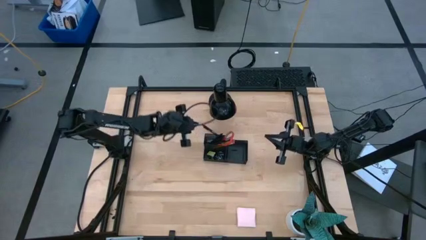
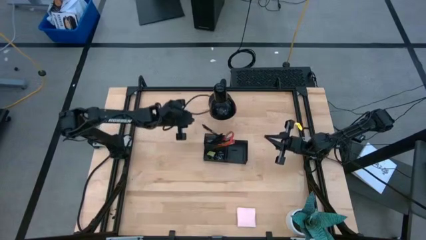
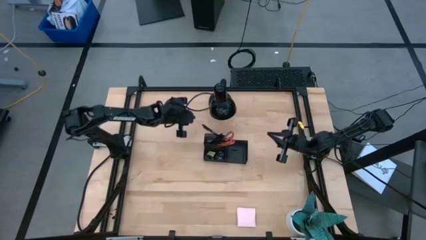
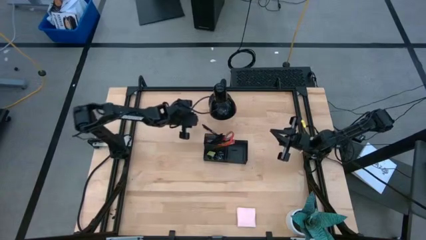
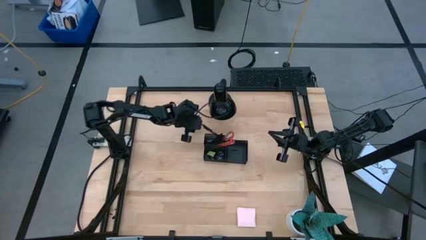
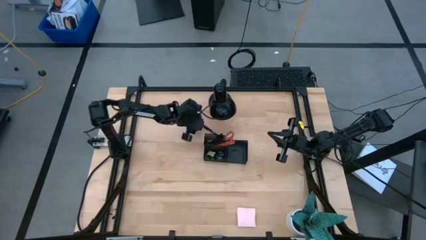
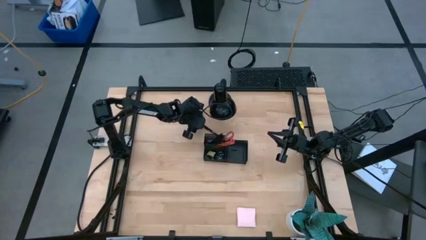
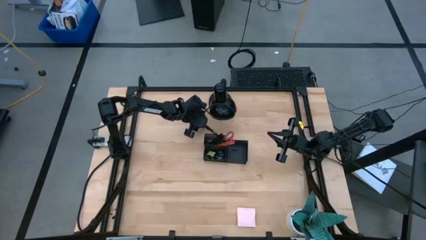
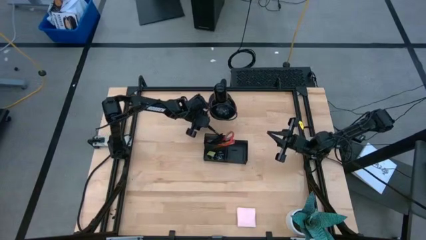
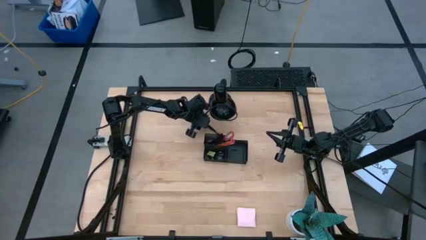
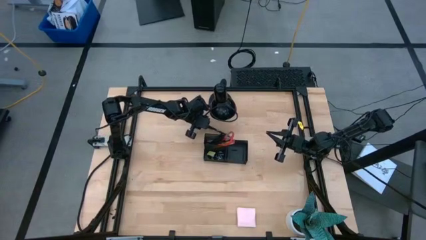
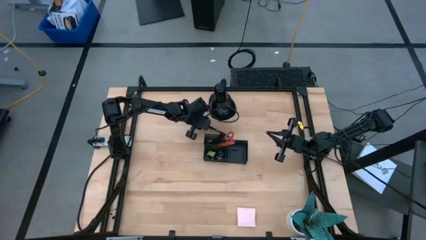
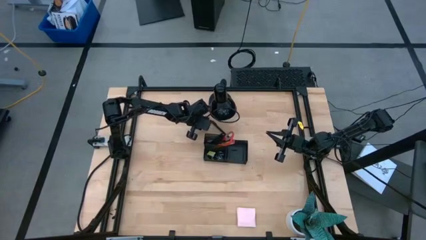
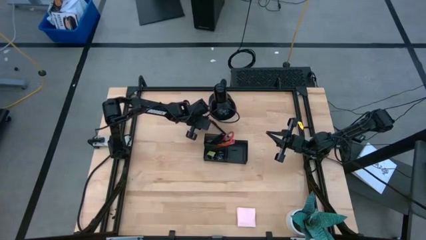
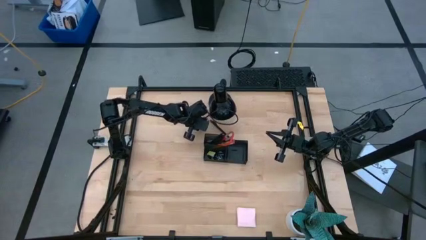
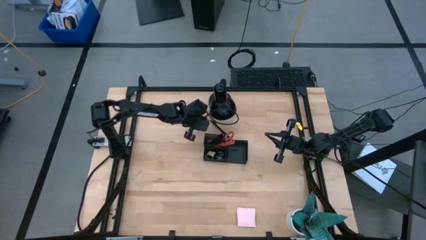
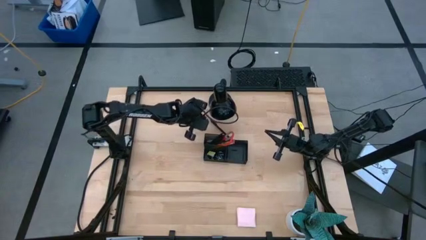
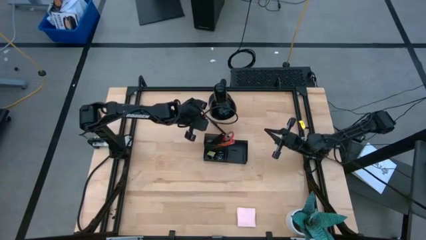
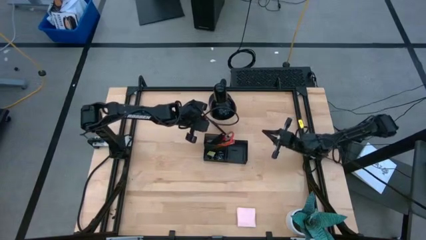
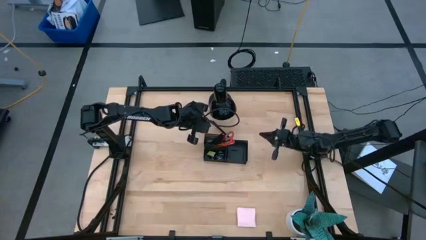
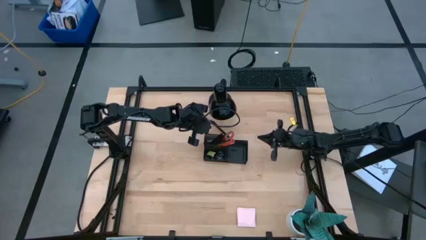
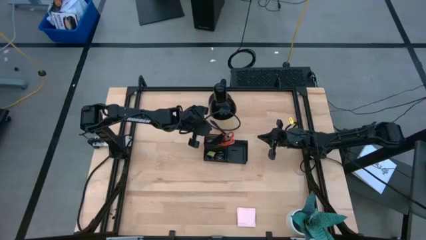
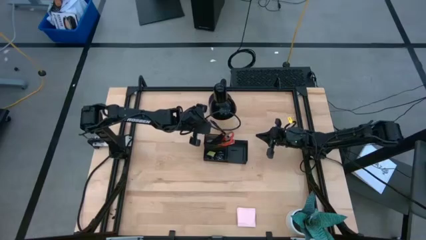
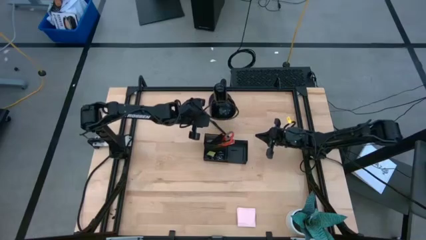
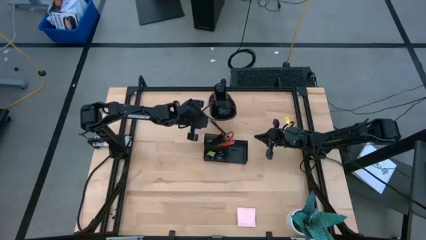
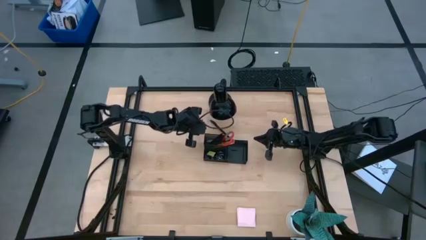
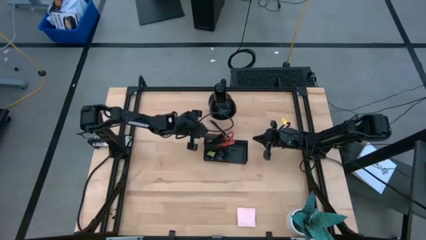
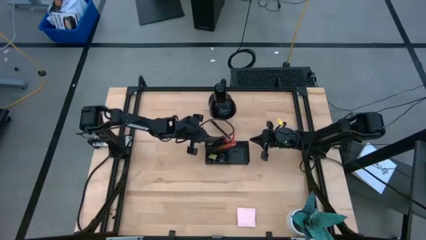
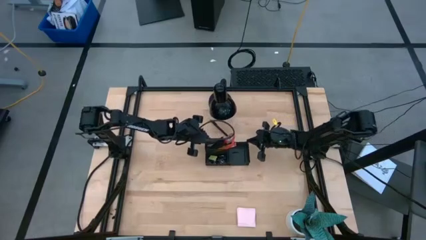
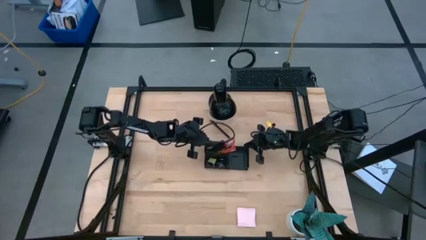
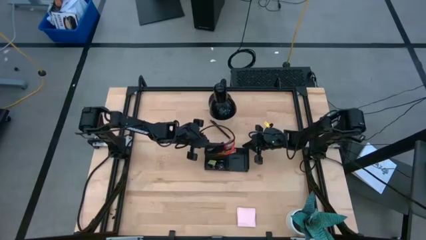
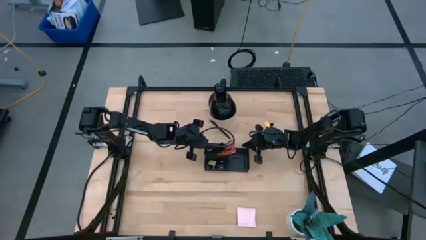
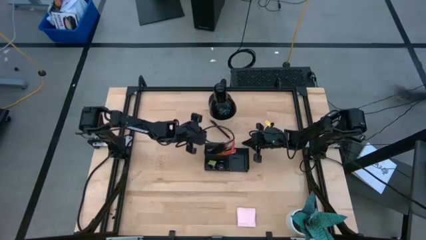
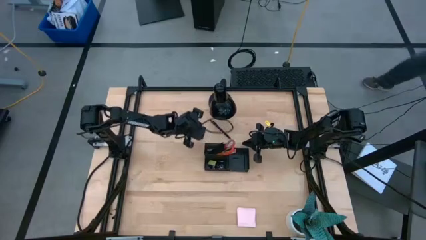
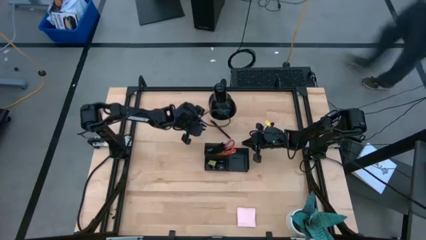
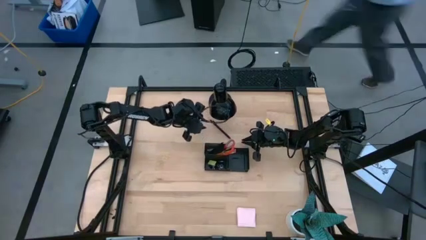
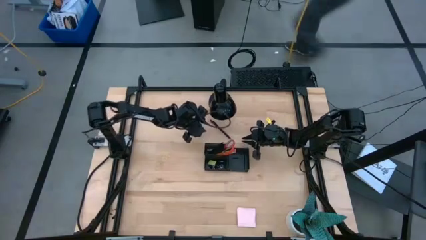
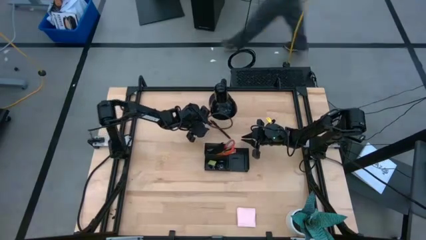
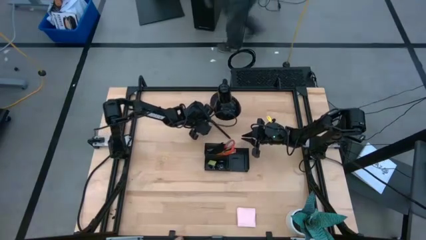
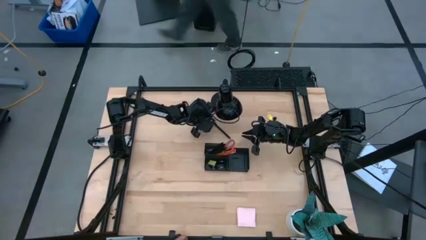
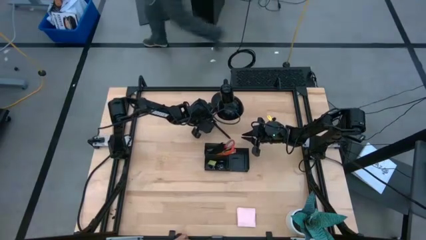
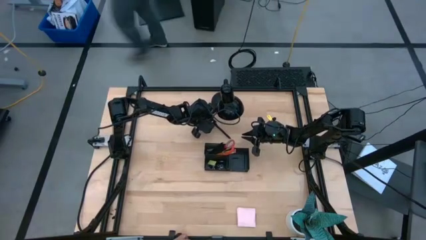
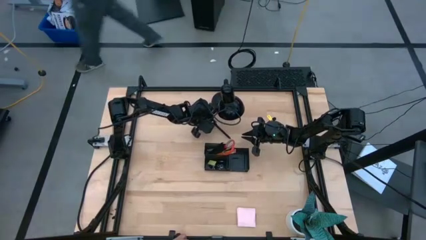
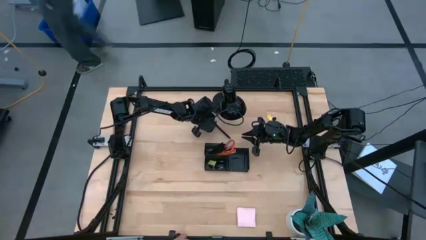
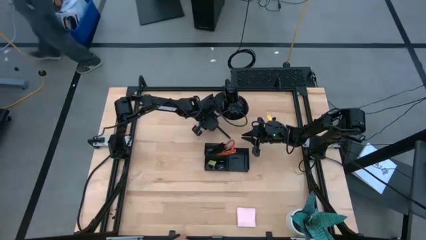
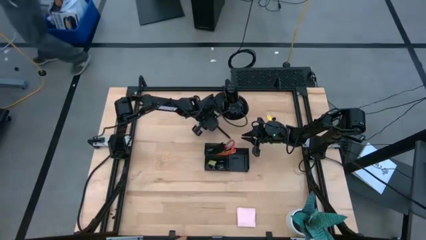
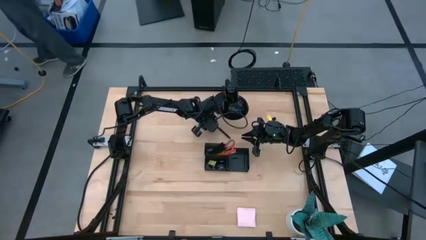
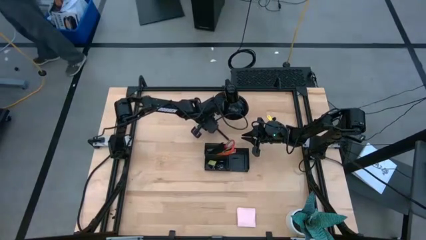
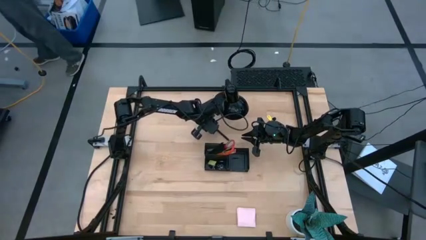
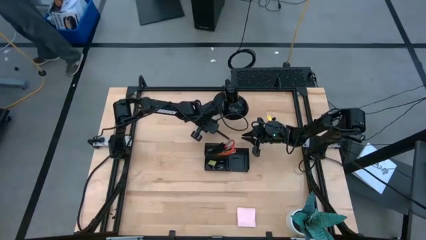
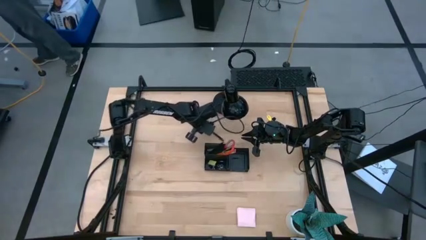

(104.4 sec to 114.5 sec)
Task: Pick and place office supplies into organizer
Put the black pen into the black desk organizer

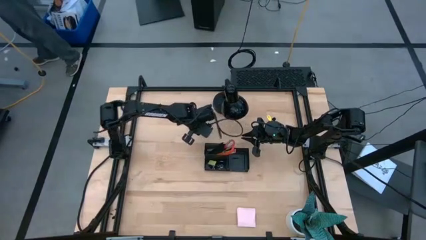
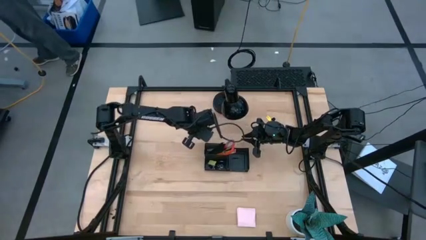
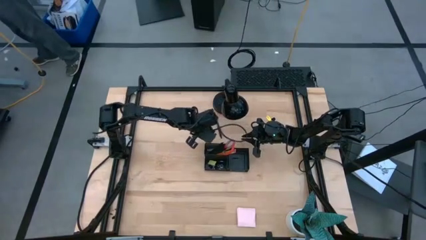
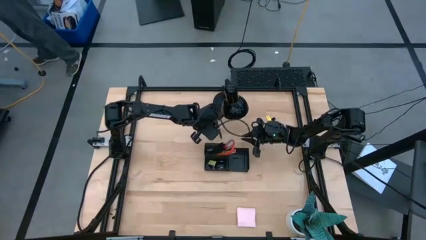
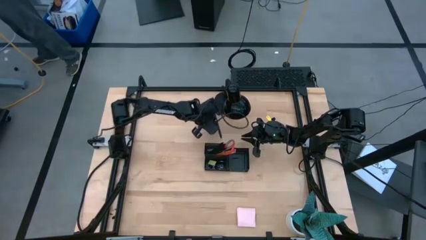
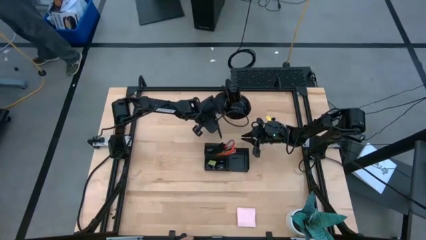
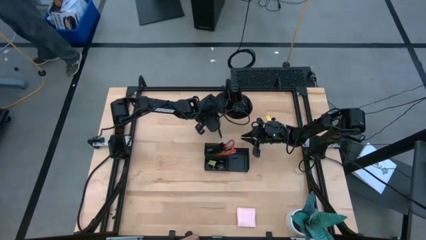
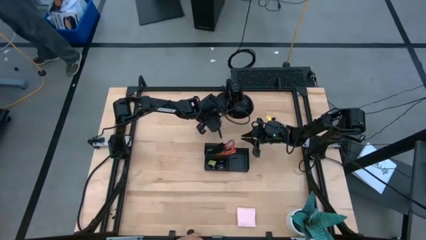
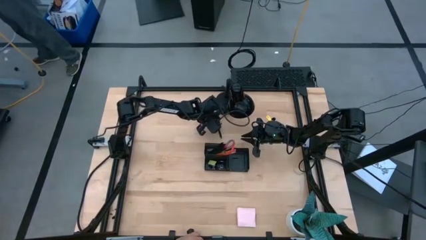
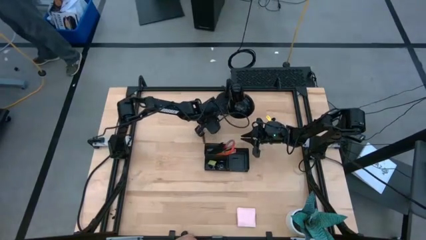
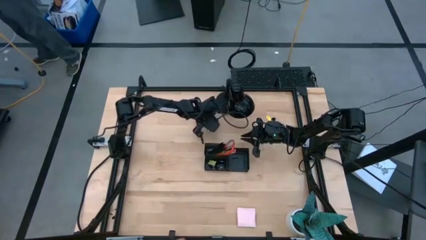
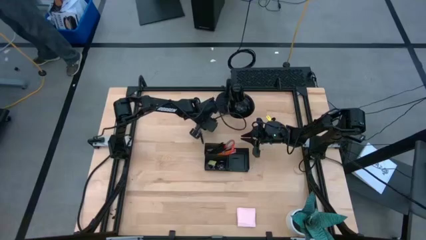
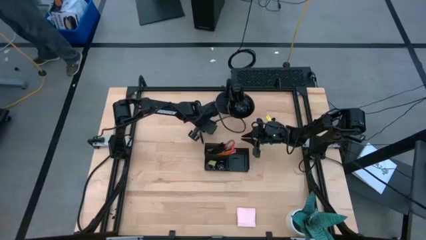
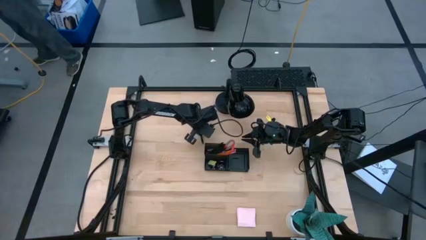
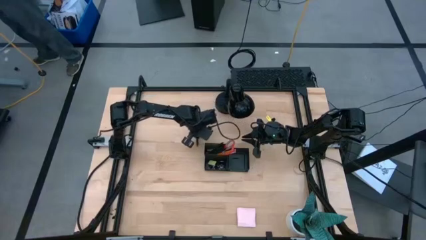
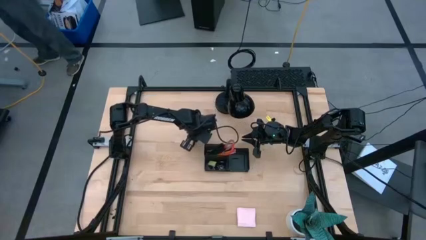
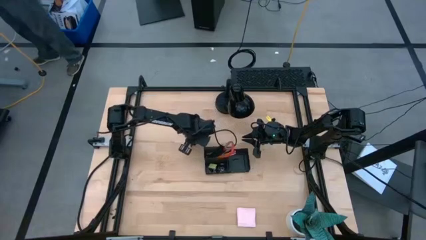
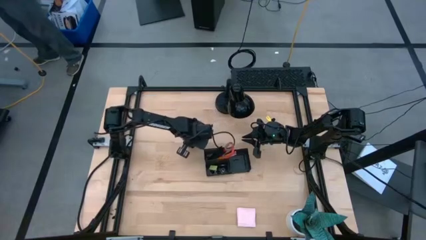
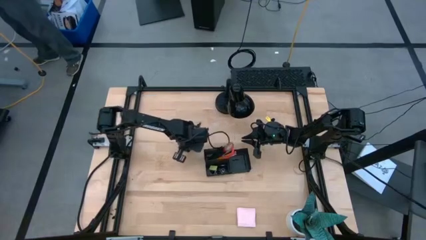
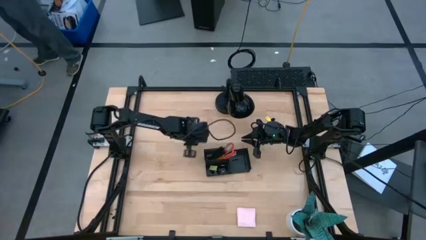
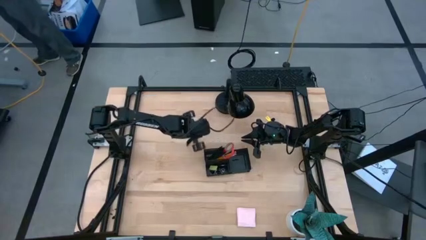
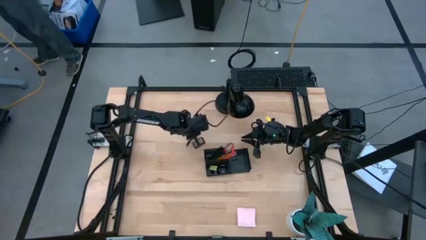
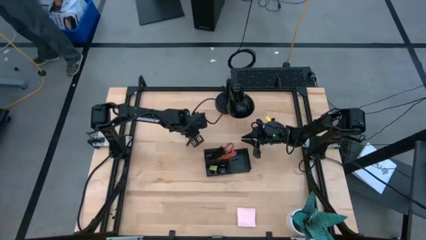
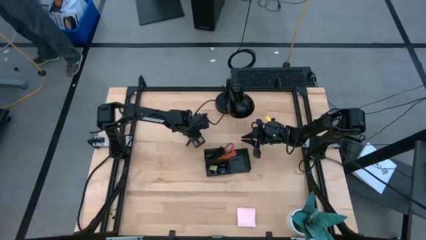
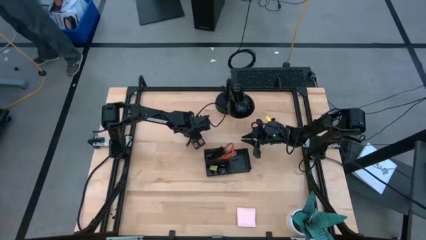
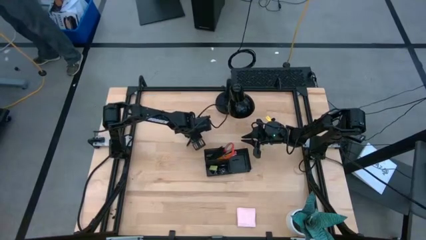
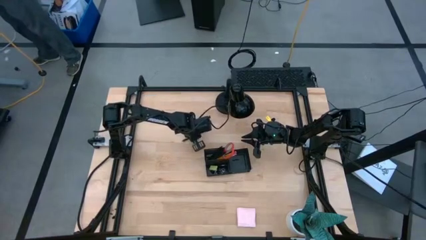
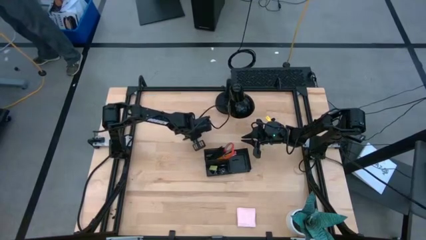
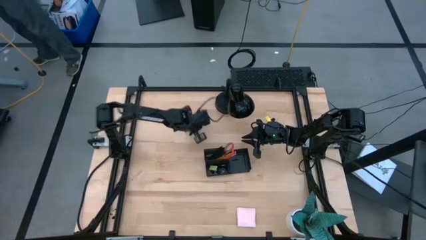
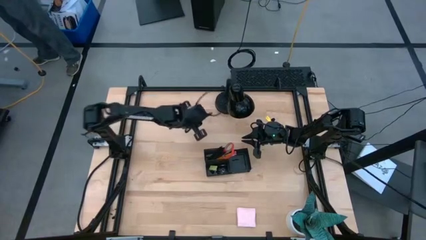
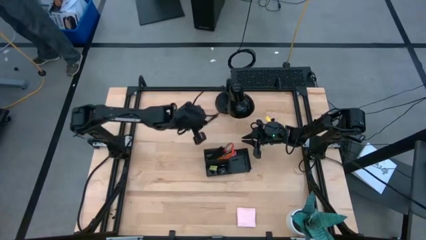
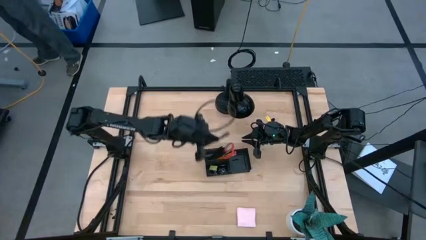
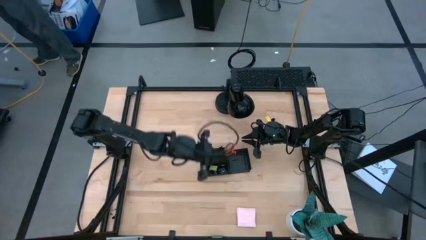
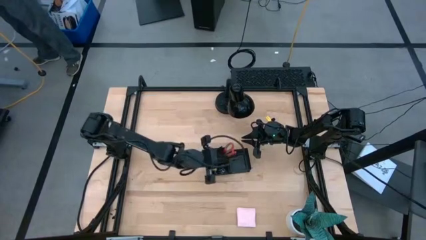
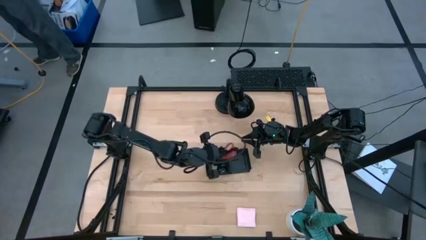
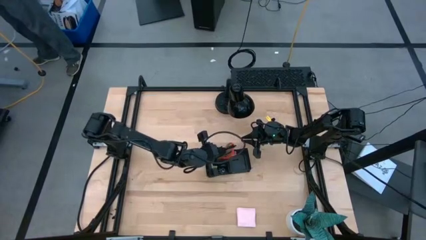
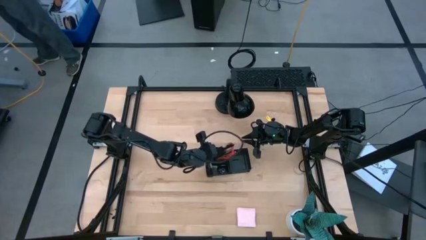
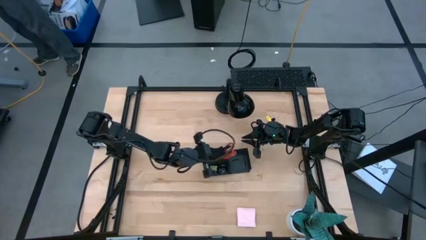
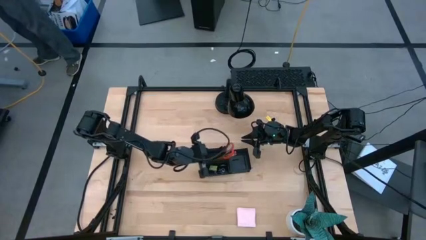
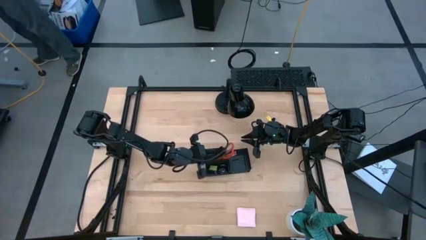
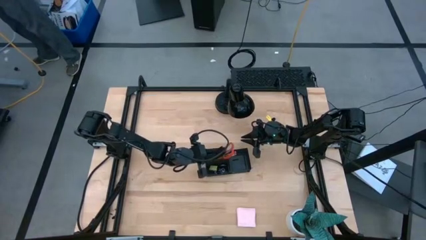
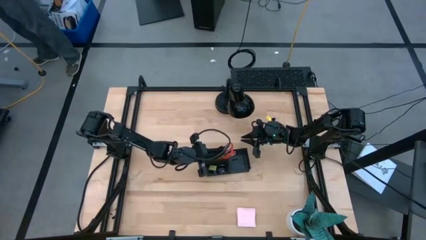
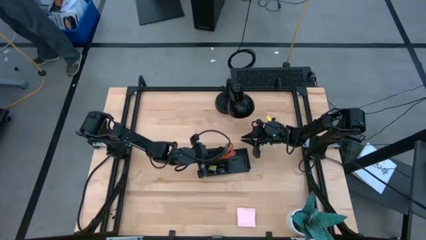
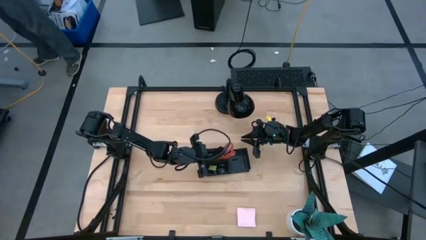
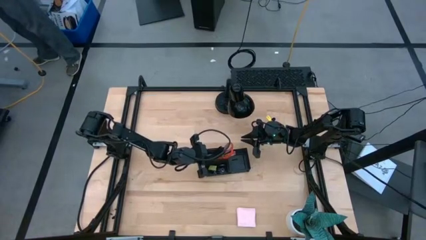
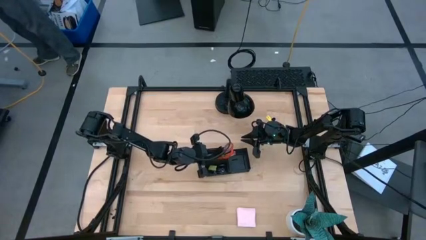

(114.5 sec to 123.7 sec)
Put the black pen into the black desk organizer
